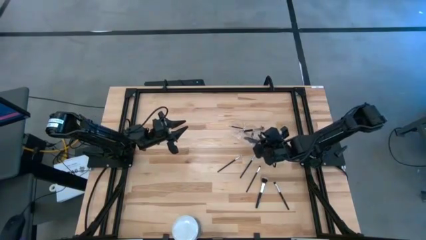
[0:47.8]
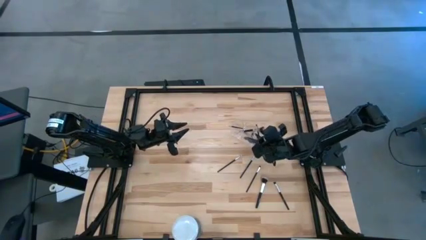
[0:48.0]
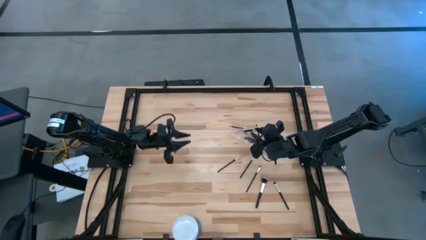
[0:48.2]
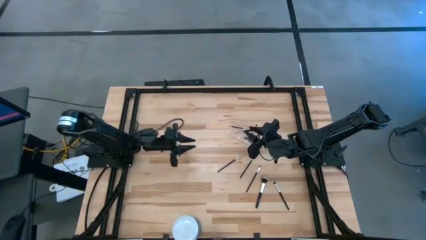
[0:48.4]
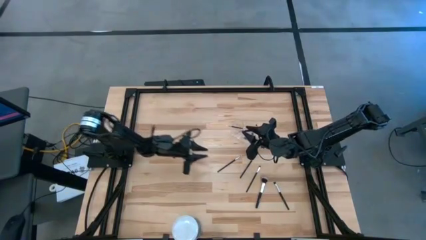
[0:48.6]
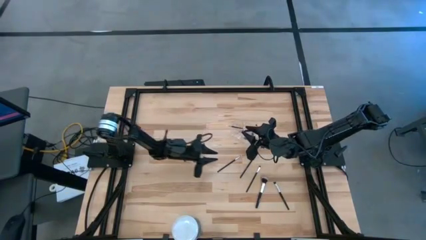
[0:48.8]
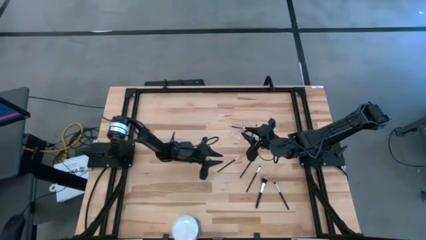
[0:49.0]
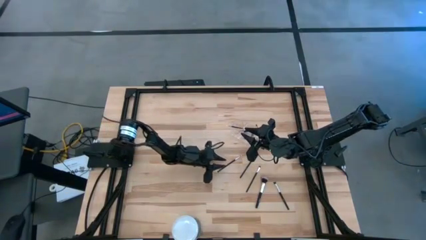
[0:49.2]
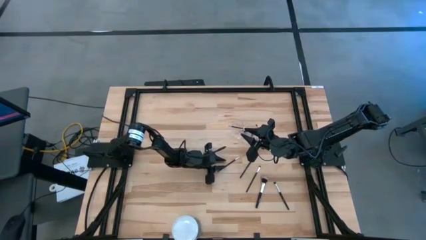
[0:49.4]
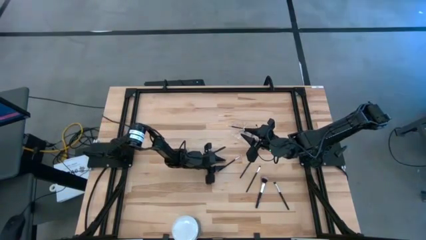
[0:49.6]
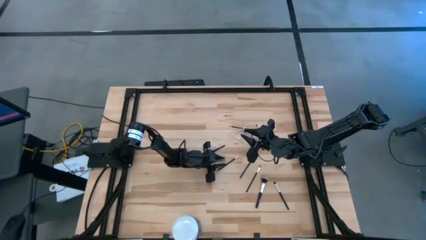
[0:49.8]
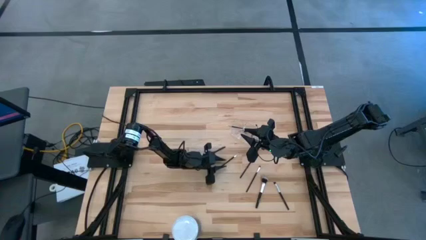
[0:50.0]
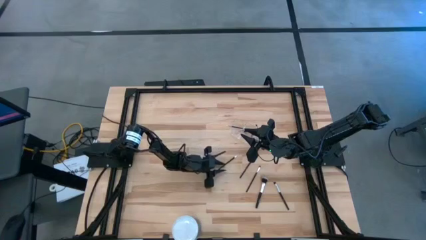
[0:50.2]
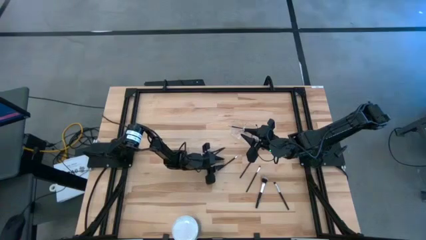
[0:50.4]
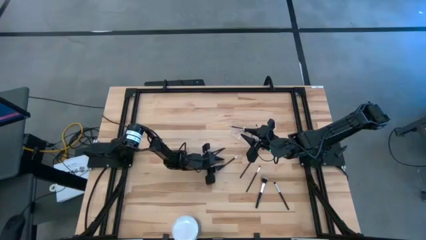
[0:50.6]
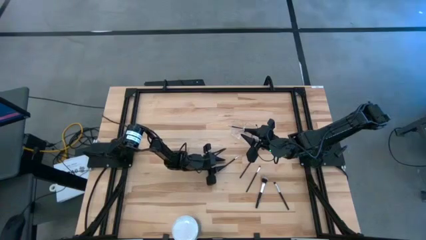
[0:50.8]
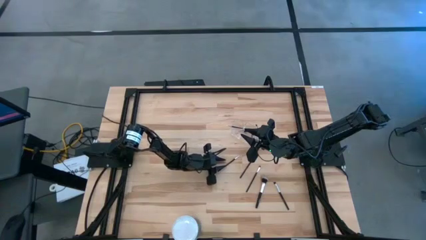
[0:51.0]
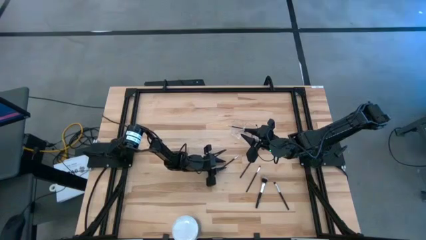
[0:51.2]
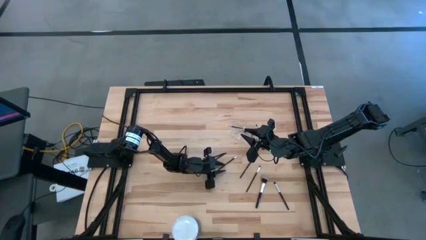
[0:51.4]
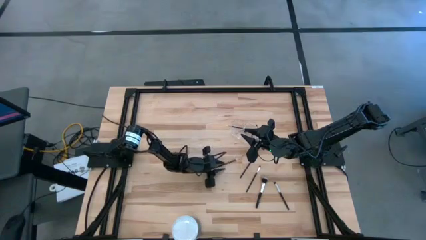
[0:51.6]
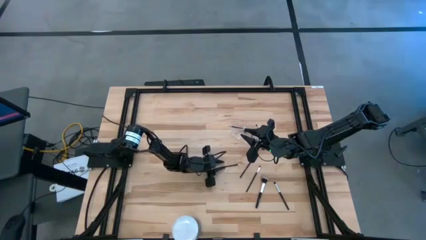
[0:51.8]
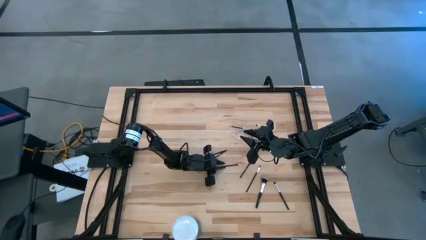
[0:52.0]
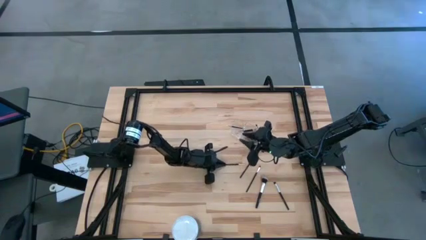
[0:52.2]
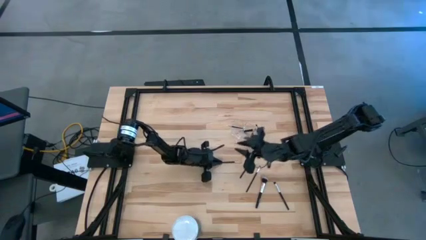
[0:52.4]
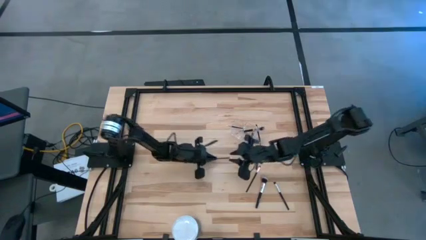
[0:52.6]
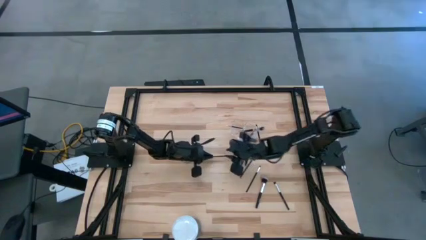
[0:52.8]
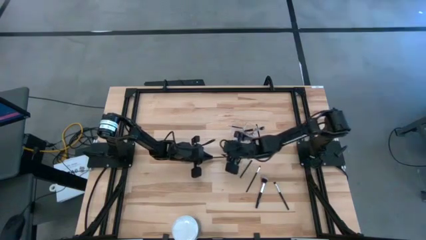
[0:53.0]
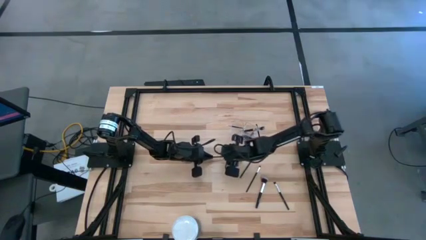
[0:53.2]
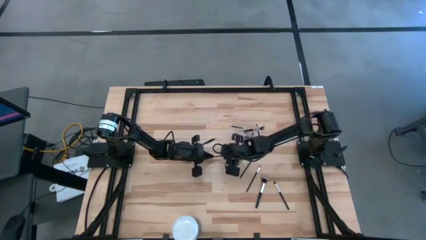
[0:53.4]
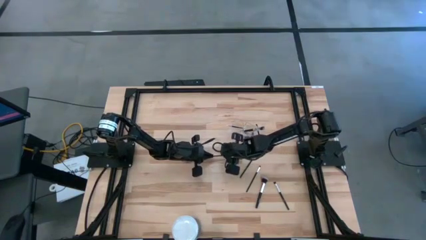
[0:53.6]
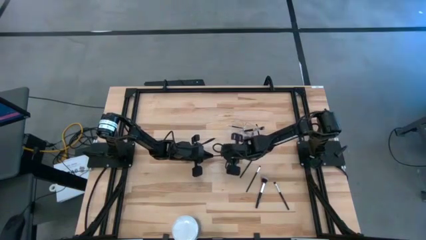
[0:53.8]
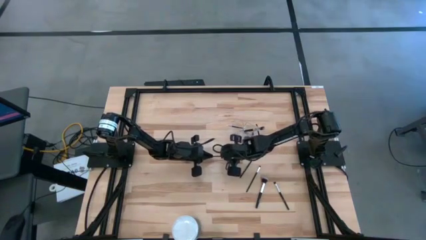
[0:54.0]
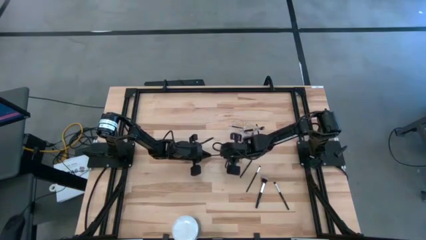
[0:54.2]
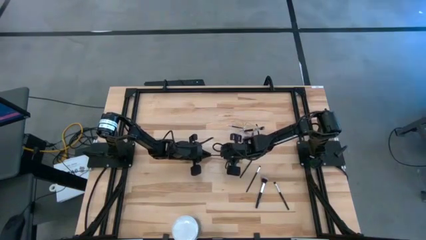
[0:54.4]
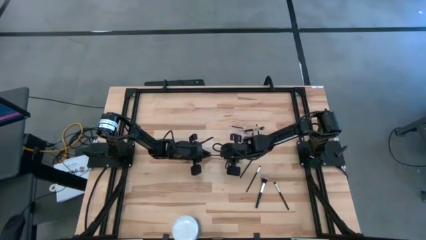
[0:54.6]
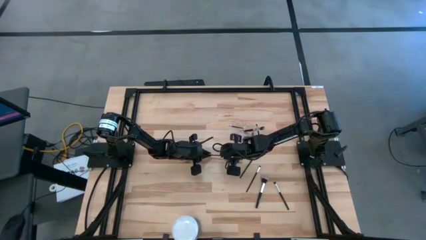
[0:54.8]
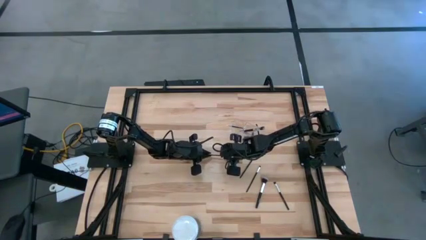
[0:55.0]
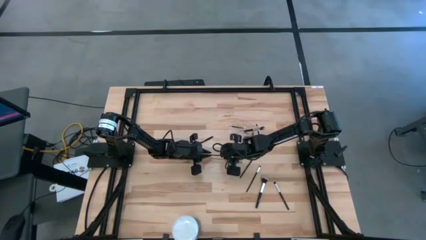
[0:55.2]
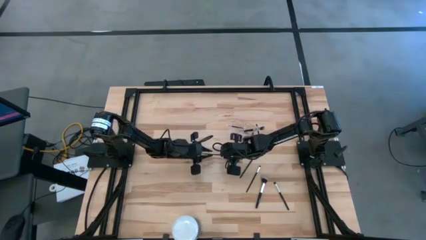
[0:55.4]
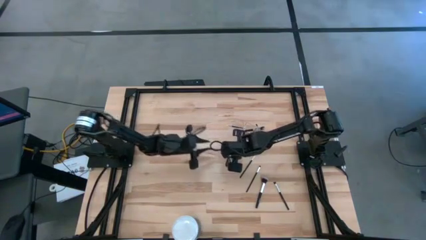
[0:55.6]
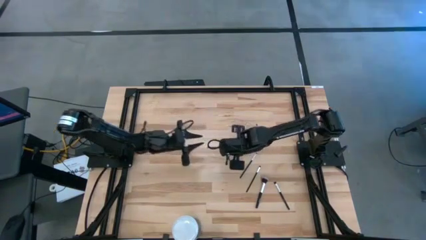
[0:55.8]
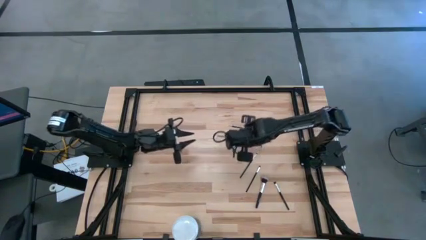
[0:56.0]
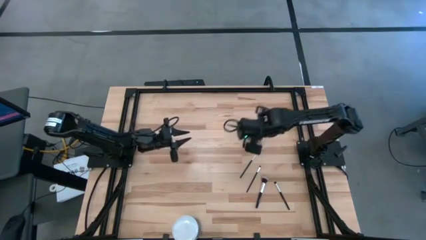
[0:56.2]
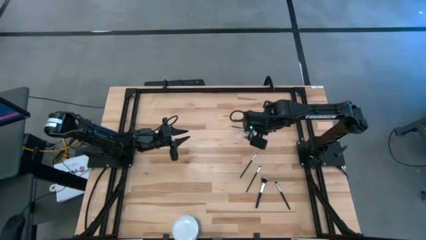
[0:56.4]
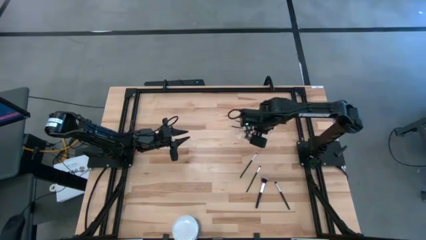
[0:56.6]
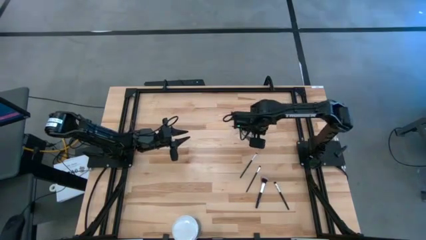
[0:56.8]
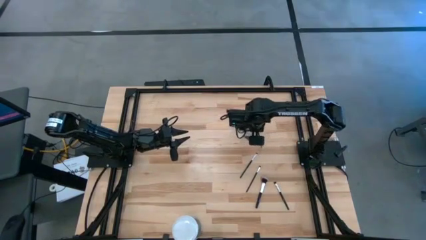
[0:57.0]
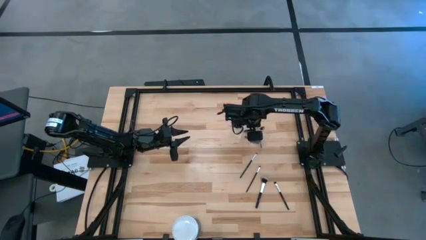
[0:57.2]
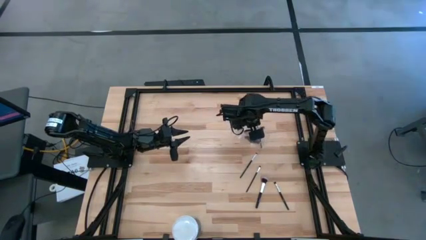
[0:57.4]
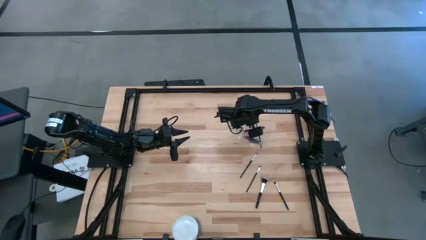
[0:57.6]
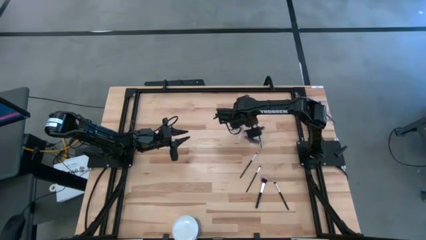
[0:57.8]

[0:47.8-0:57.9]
Task: Pick & Place Makeup Brushes
Put the black liner brush into the makeup organizer

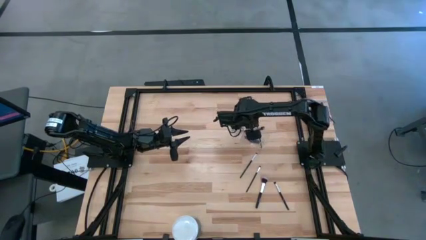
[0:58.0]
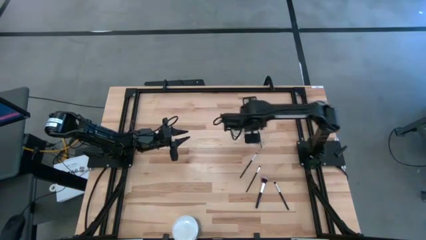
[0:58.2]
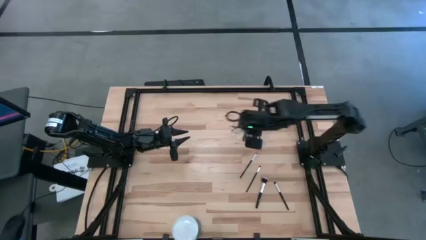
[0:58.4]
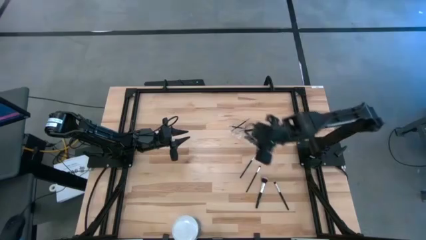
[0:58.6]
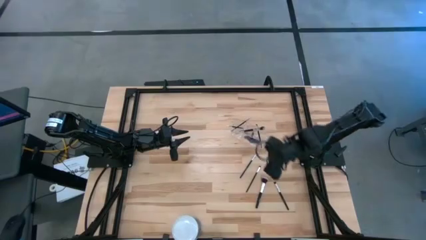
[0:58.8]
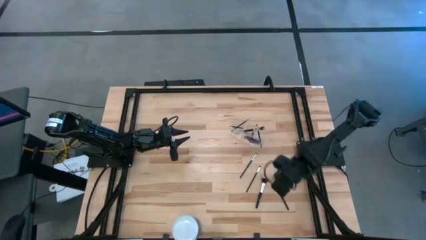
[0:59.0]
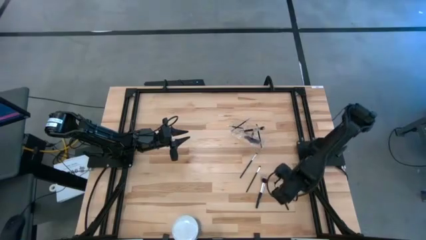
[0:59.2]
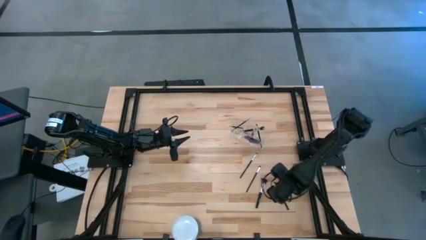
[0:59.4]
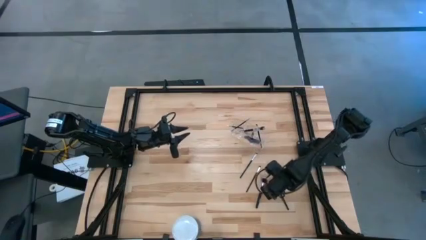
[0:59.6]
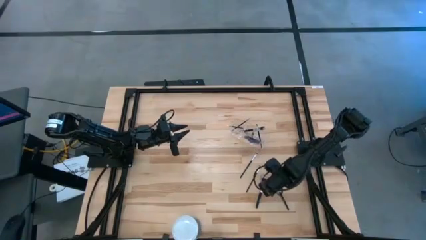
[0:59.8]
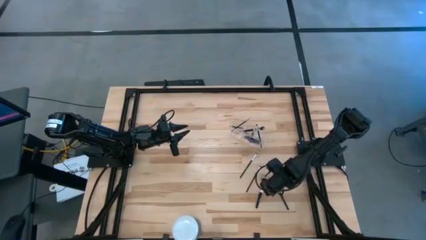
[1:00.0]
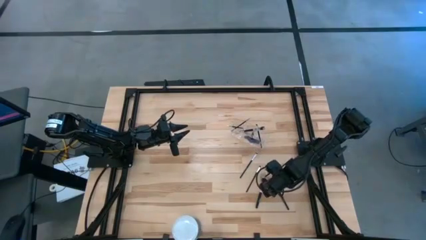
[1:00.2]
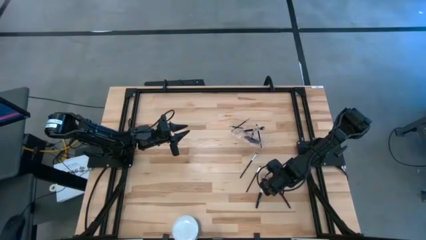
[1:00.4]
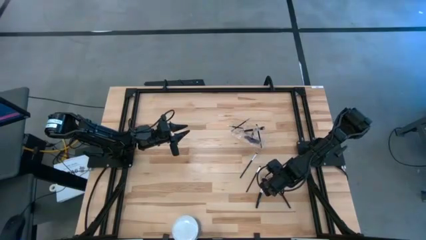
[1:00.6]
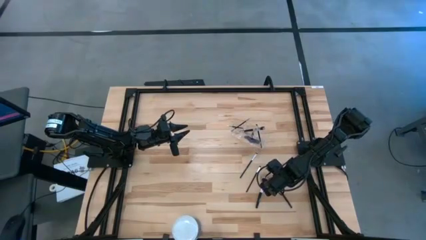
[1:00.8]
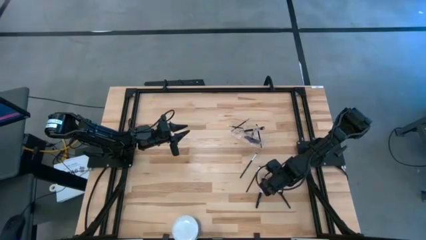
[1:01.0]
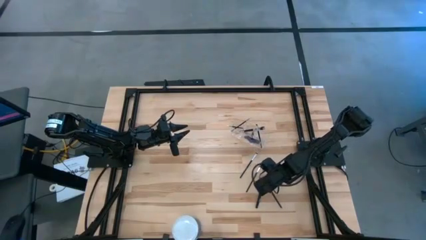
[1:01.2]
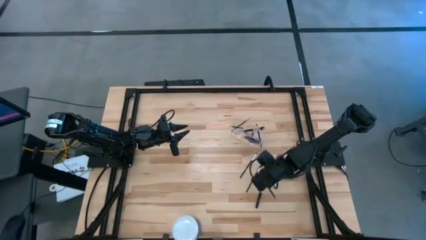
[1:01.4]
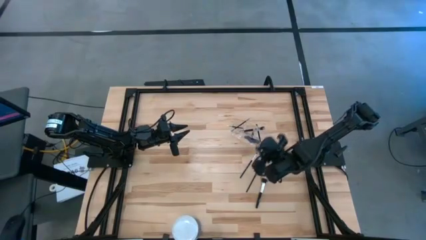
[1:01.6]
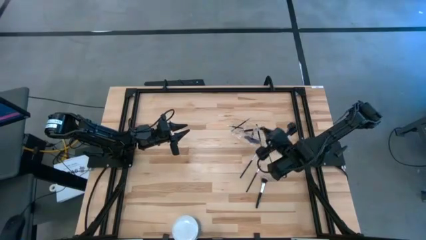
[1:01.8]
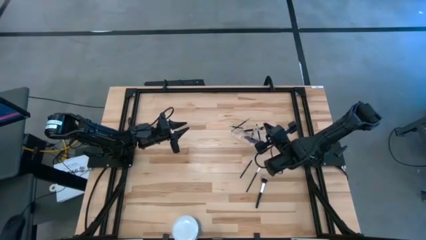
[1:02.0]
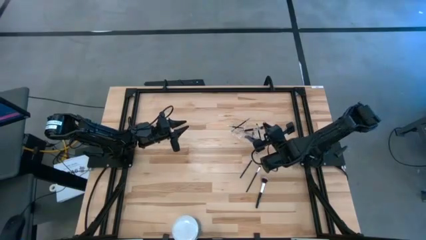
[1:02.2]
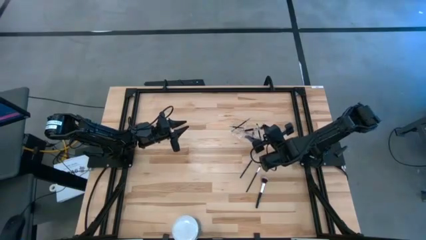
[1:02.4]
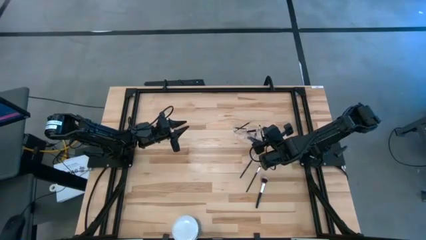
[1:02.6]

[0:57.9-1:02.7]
Put the black eyeshadow brush into the makeup organizer

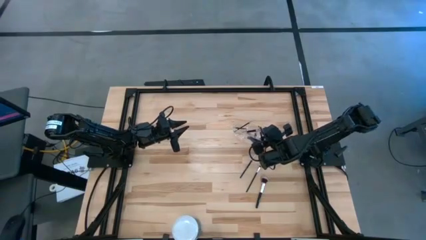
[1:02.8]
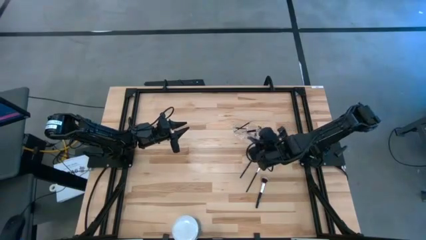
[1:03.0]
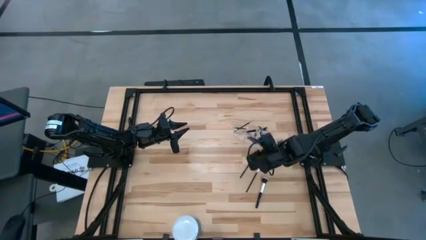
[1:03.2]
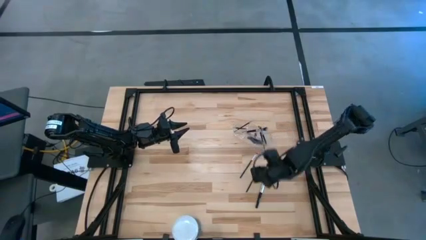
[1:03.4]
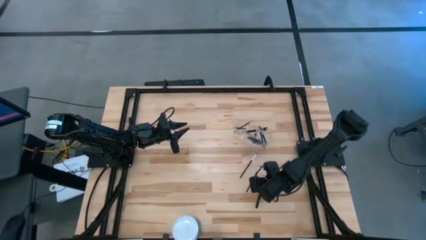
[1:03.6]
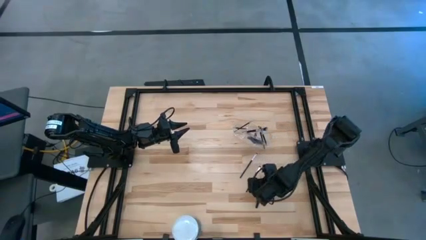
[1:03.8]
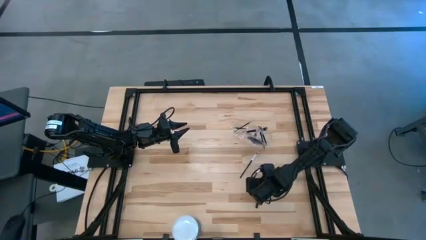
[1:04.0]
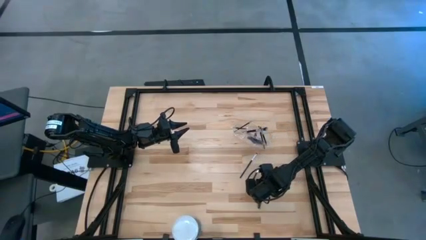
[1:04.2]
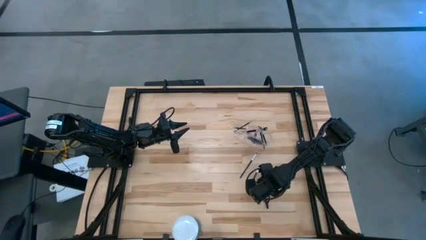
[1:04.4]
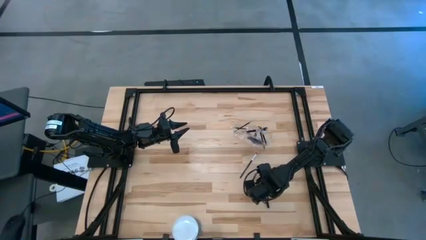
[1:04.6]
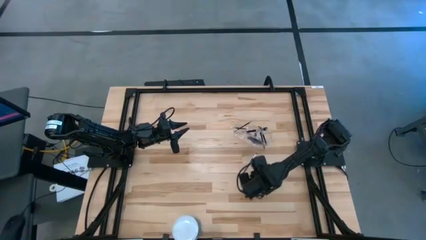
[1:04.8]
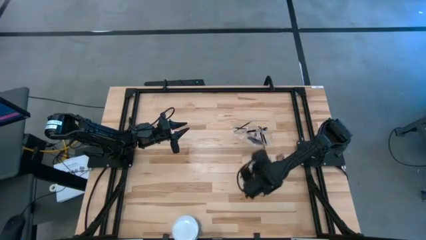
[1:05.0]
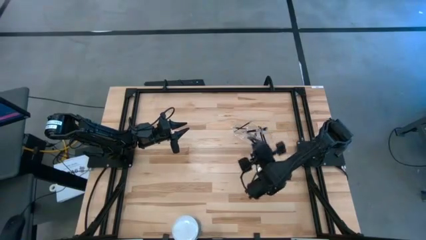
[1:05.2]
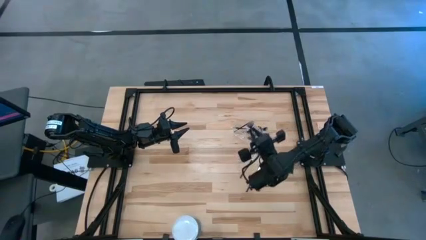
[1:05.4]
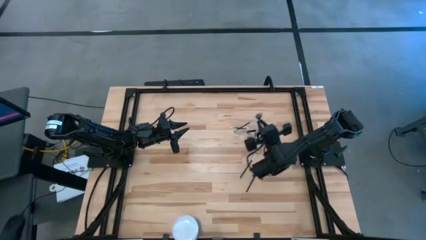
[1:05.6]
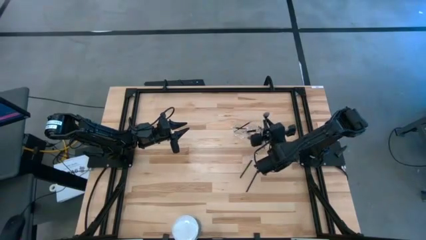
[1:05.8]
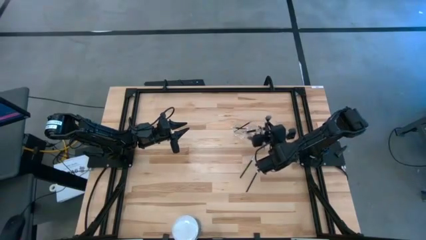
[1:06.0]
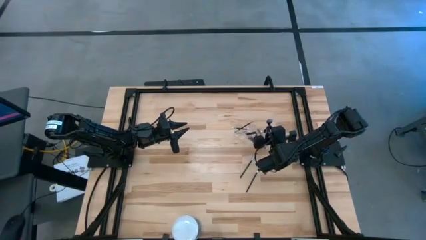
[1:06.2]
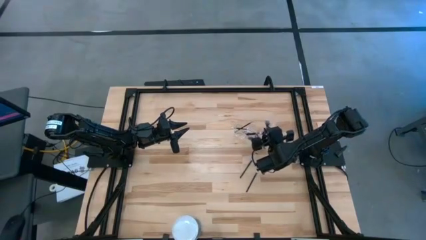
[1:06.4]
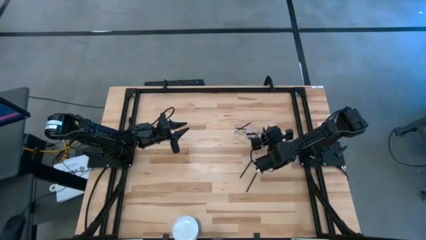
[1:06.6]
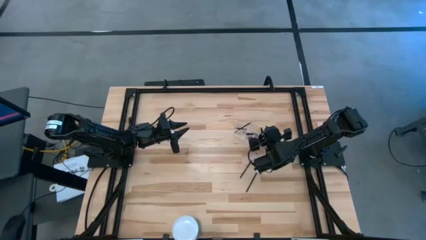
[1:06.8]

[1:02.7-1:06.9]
Put the black powder brush into the makeup organizer
